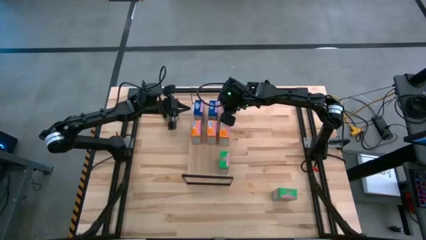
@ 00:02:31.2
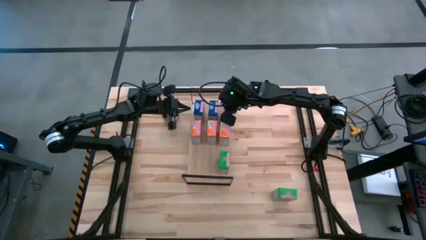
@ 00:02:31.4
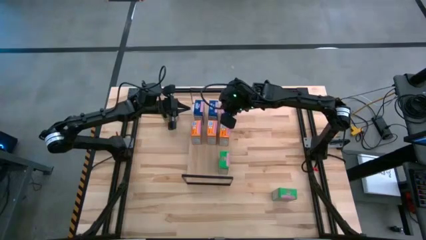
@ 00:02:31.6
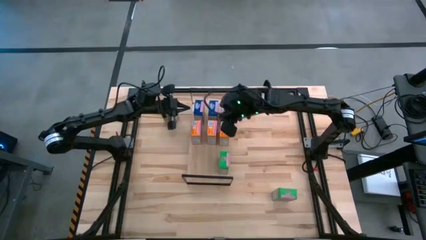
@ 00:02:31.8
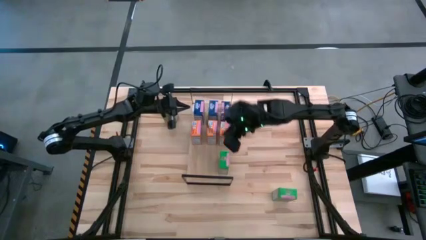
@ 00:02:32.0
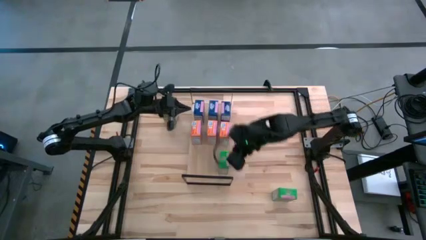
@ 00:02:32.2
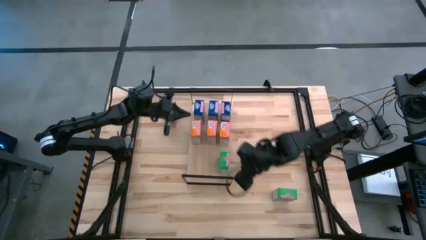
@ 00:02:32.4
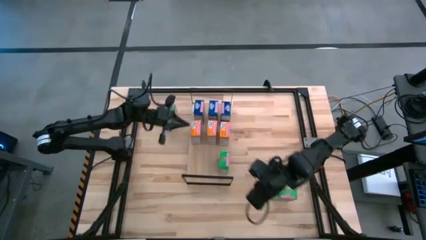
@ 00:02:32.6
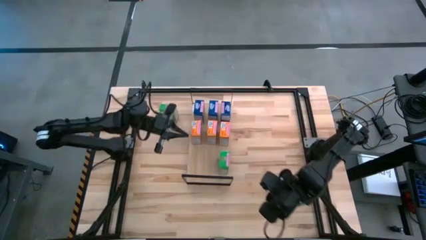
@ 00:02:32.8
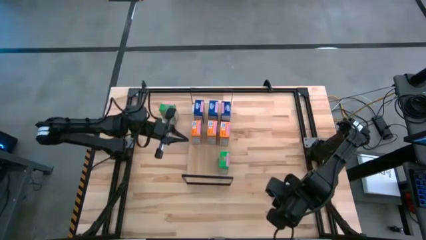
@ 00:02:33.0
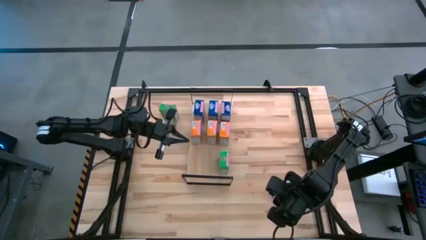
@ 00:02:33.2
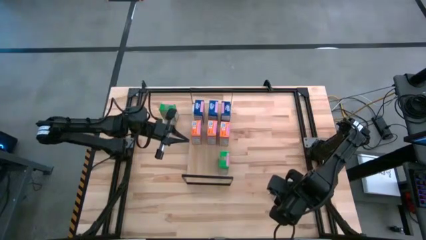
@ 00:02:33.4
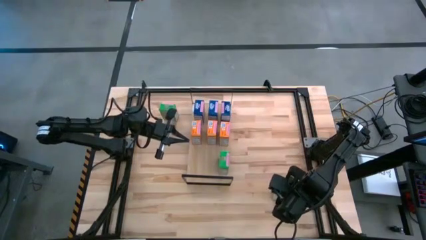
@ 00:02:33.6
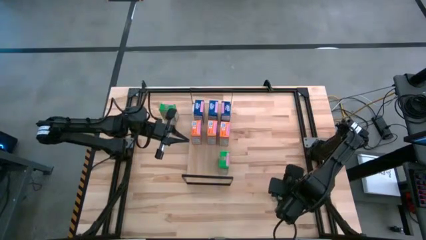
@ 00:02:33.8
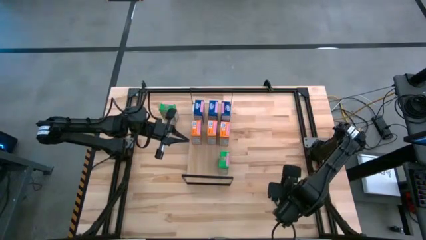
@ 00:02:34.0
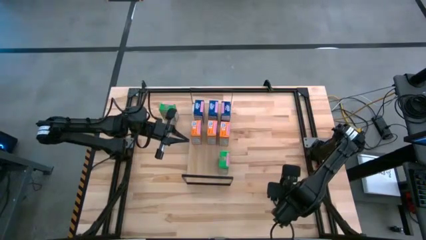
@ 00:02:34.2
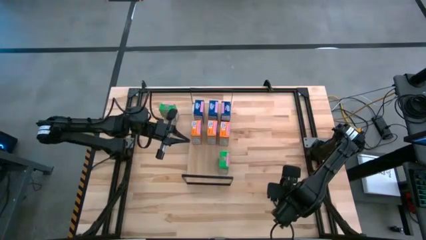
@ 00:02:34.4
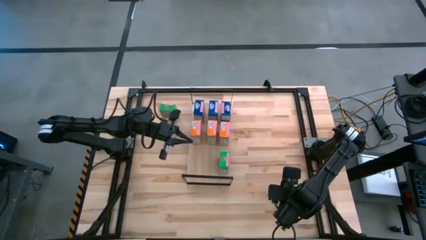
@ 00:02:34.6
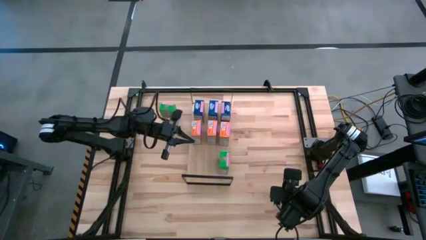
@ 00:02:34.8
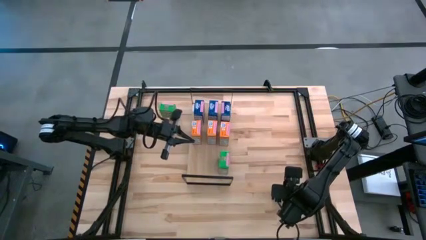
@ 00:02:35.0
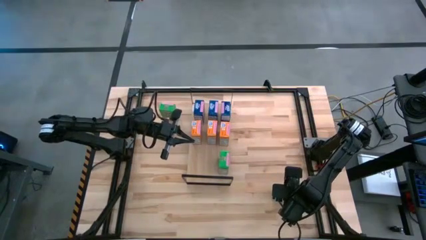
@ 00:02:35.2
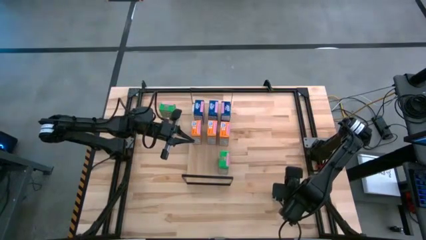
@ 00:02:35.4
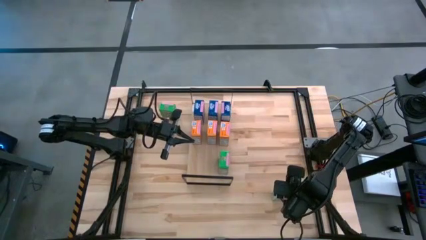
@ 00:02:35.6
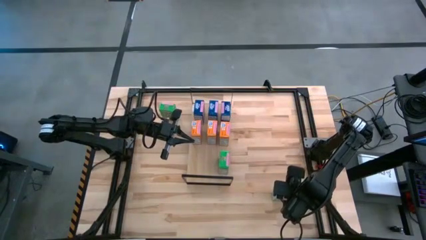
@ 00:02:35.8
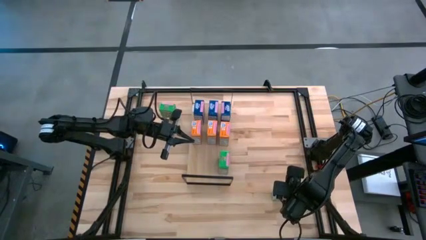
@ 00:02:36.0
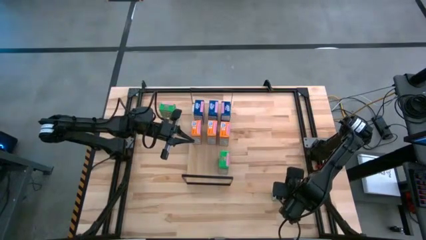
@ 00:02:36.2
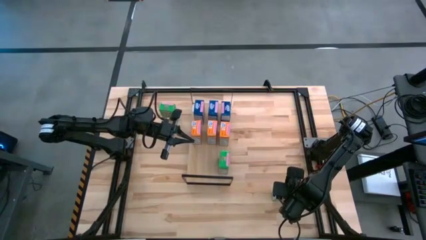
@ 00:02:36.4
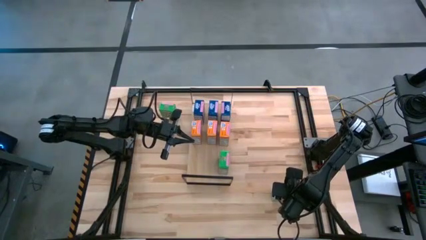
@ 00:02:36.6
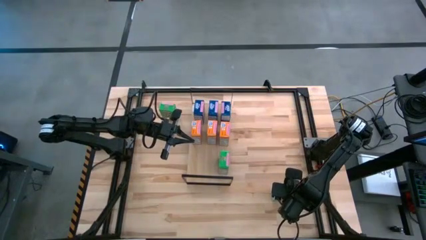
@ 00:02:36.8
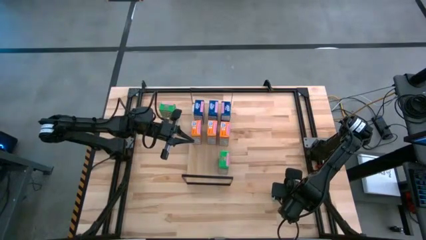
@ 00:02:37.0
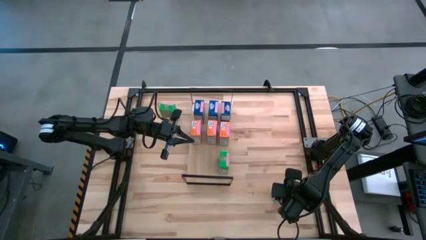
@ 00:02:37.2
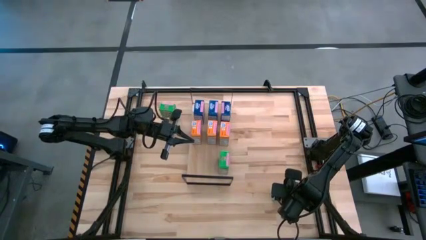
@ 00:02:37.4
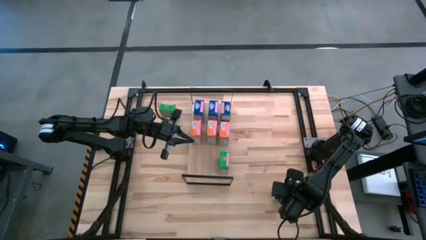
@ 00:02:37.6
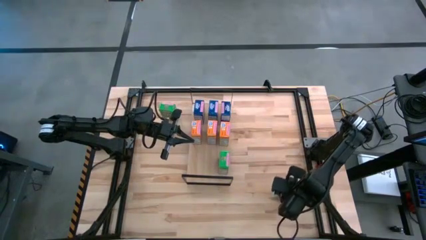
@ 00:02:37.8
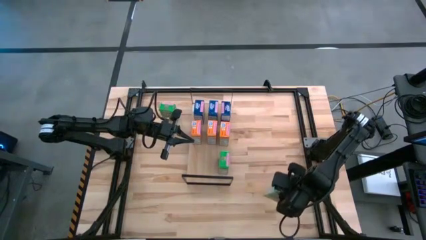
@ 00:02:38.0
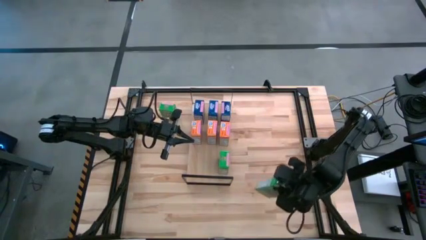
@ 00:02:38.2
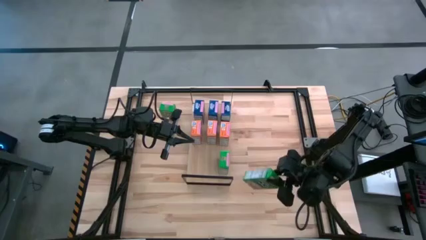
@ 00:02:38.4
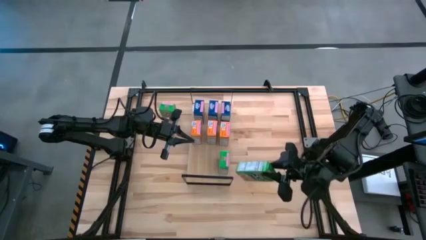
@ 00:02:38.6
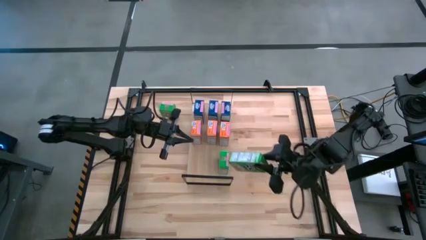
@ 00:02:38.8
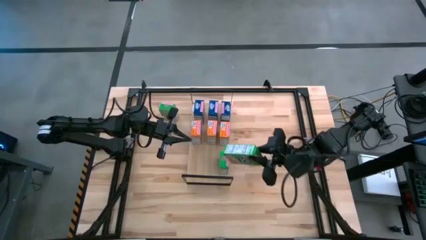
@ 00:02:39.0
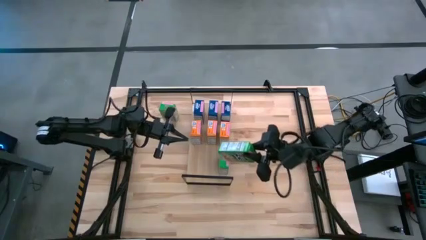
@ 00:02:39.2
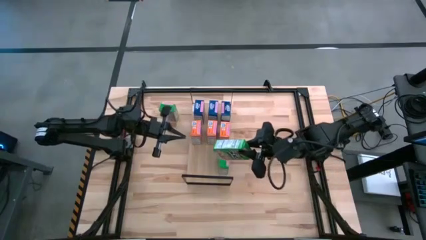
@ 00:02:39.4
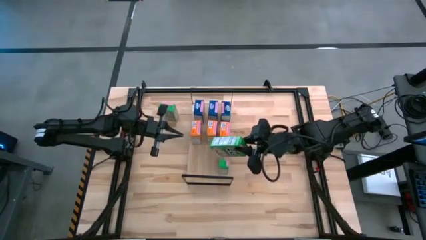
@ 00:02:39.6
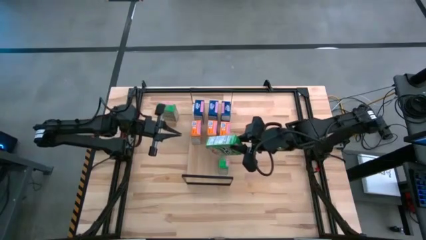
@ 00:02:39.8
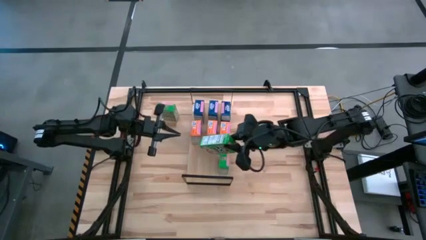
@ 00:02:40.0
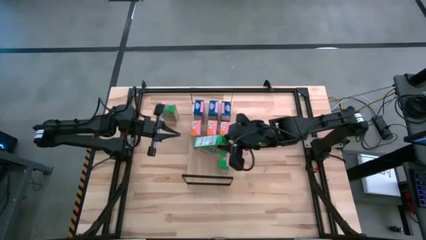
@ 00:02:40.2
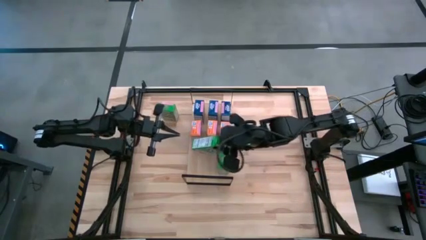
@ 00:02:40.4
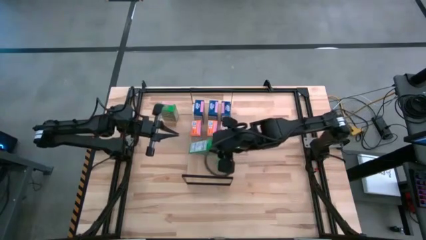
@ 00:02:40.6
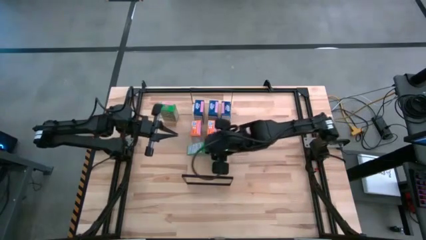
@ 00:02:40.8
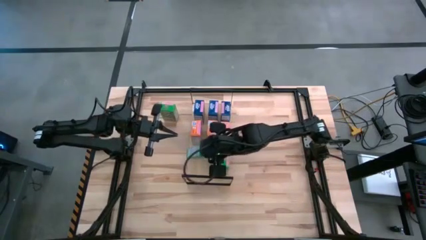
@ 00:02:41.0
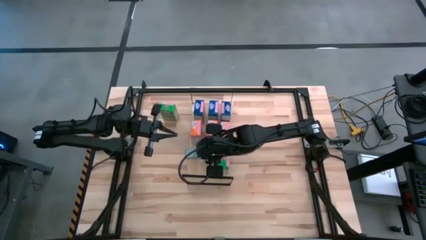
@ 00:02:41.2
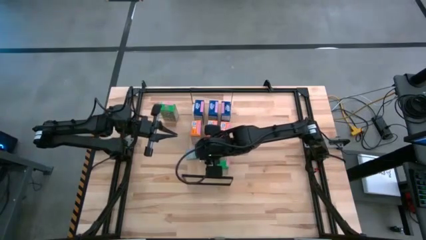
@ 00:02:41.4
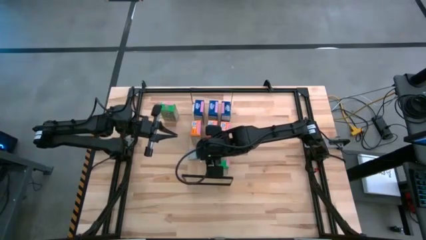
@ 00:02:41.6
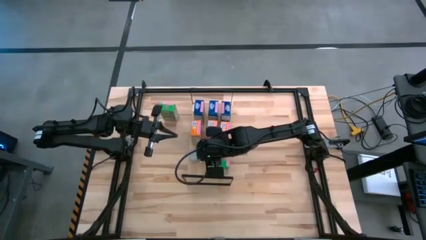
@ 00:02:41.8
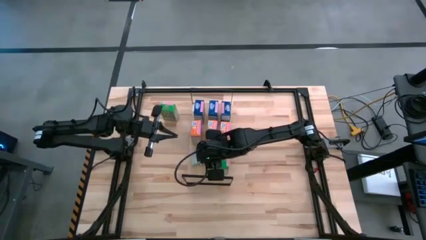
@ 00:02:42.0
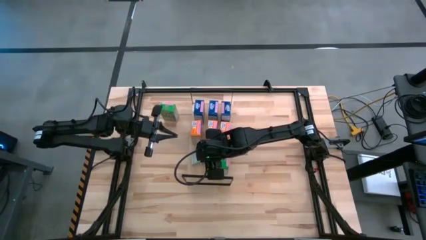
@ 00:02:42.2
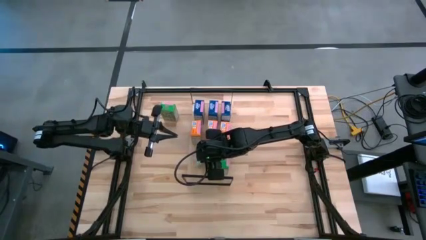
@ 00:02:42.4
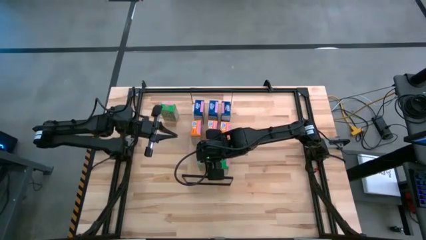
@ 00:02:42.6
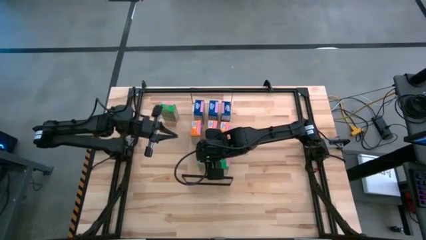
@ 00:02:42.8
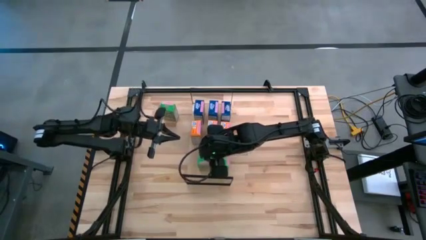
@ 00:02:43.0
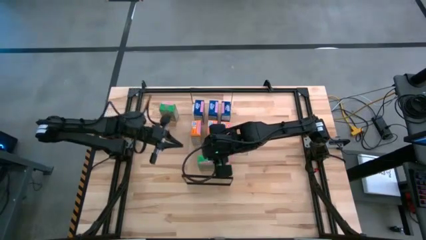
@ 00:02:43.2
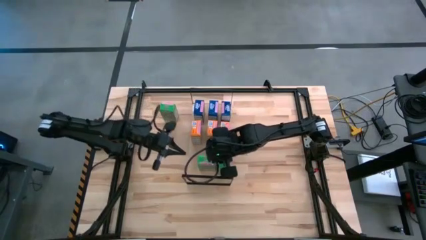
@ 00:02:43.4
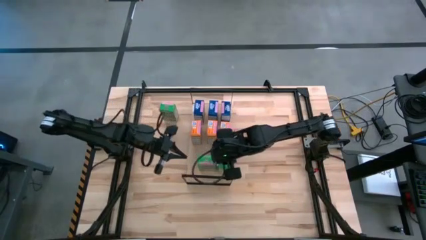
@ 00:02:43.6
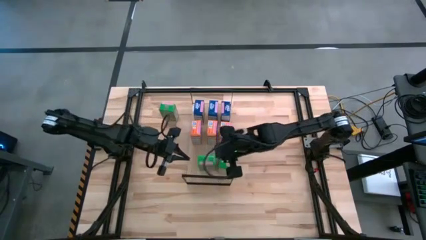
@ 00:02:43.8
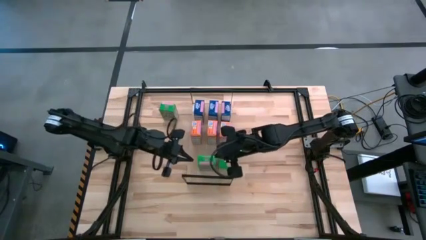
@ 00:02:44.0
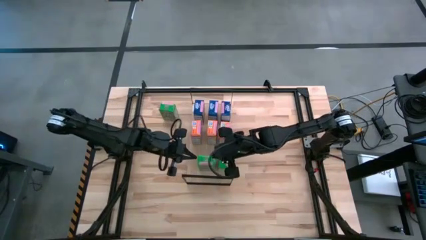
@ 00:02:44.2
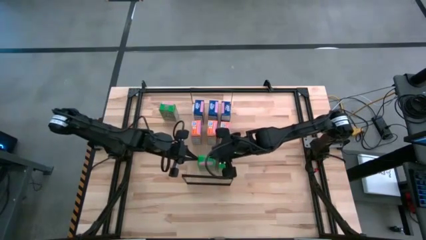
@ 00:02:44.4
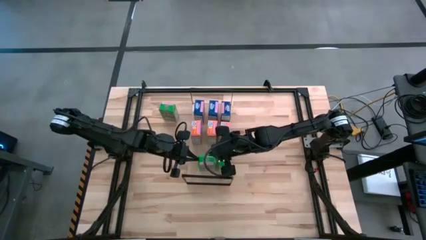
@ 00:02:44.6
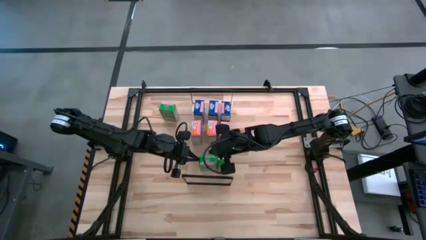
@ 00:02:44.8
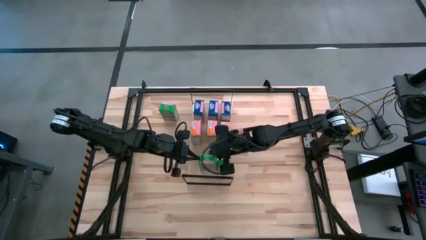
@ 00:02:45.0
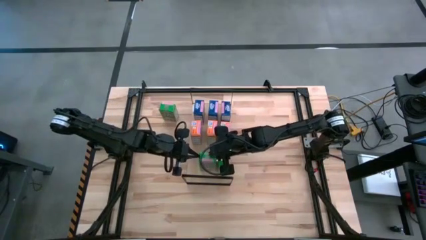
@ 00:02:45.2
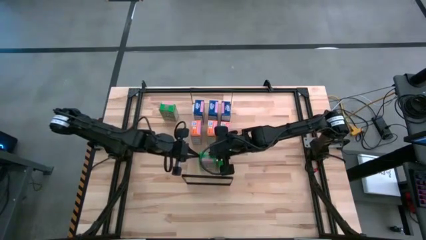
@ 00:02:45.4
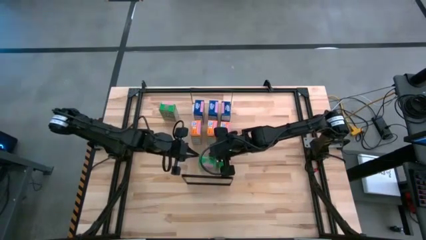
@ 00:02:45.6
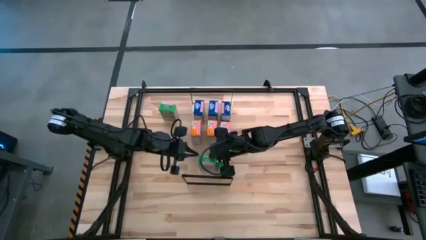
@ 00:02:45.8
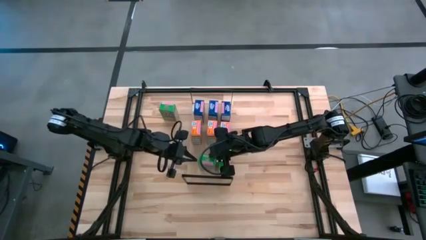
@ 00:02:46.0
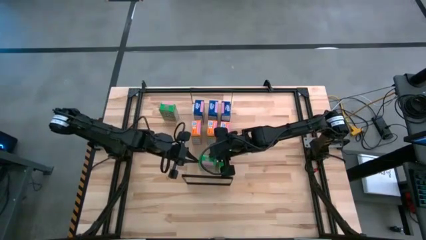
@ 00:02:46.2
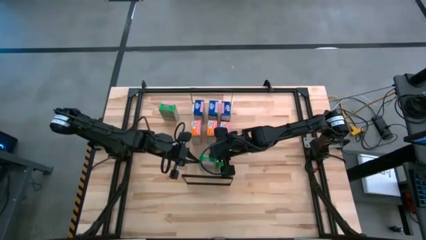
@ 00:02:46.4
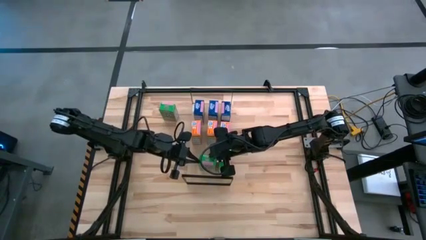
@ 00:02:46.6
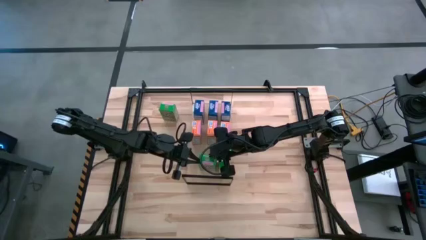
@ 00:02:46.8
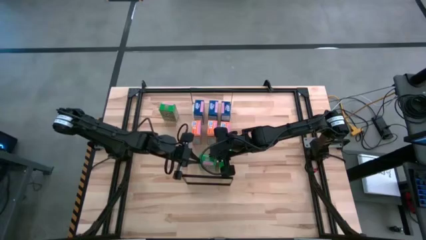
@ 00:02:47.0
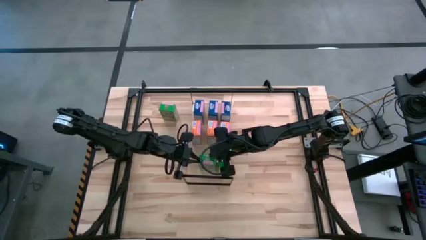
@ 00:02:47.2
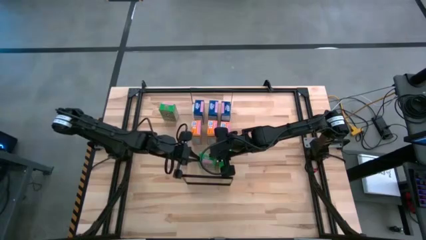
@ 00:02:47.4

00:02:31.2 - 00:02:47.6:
Task: Stack cereal on shelf
Put the bottom green cereal box on the shelf aligned with the other green cereal box
